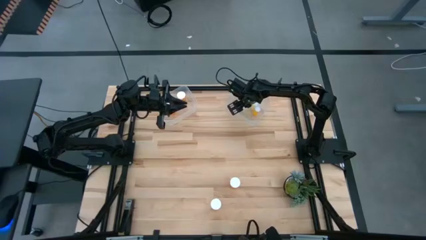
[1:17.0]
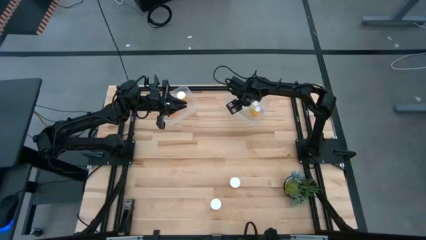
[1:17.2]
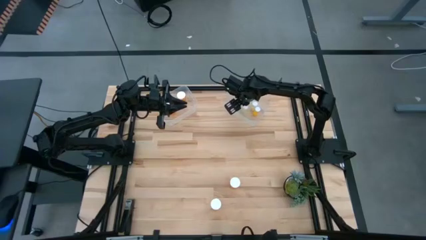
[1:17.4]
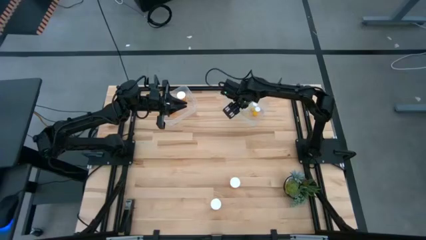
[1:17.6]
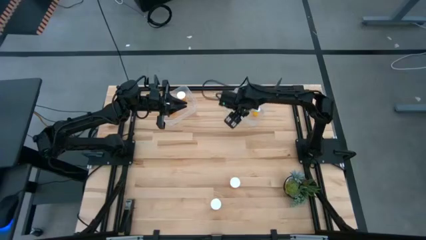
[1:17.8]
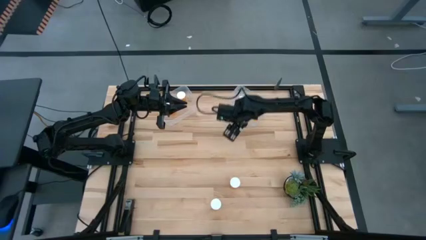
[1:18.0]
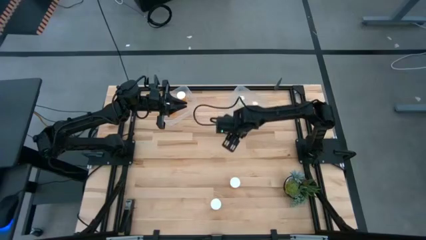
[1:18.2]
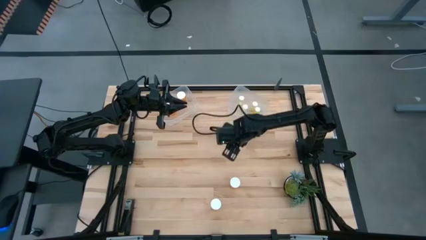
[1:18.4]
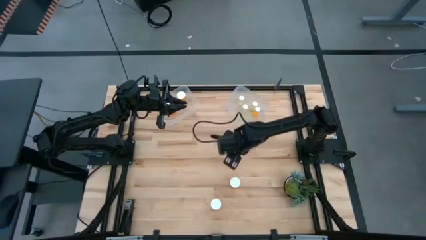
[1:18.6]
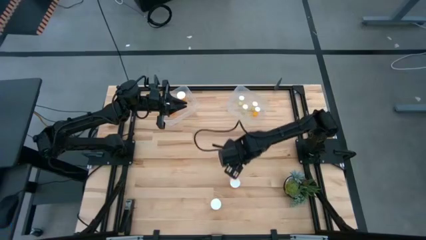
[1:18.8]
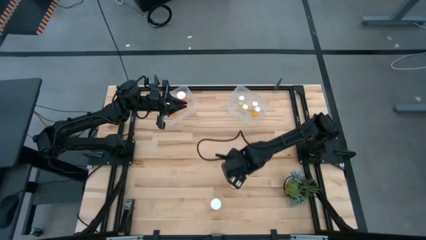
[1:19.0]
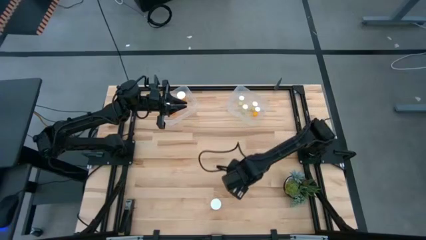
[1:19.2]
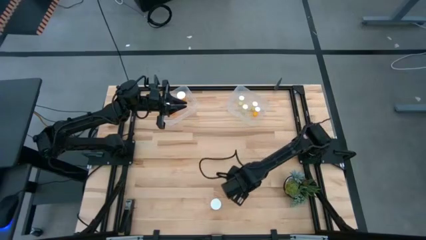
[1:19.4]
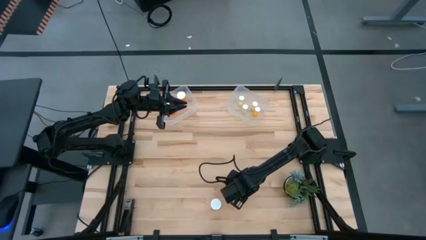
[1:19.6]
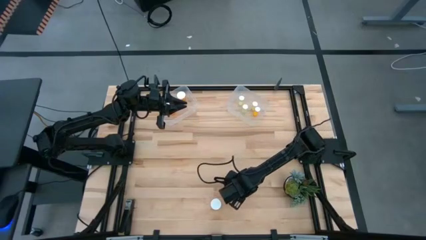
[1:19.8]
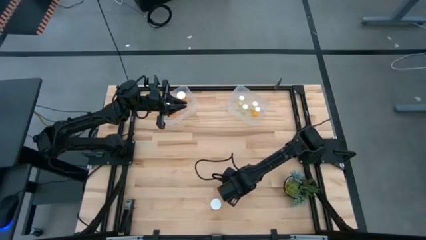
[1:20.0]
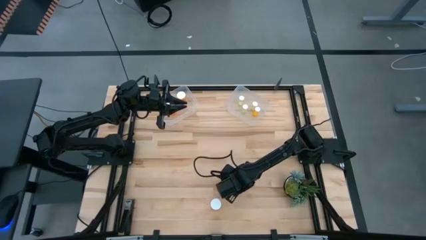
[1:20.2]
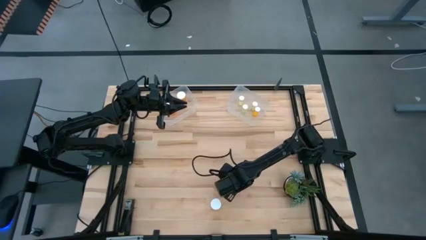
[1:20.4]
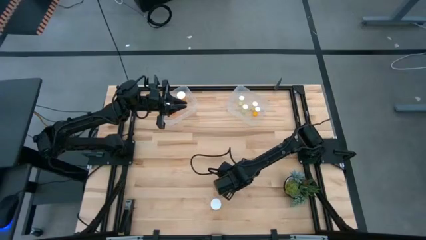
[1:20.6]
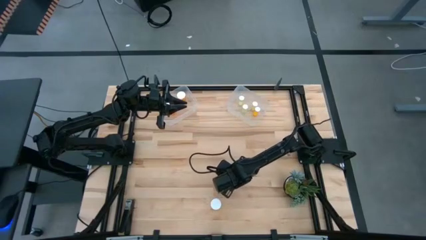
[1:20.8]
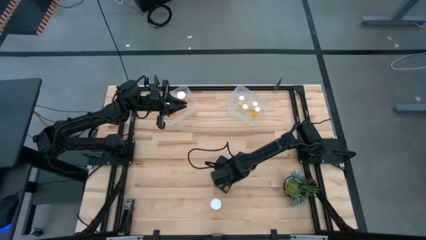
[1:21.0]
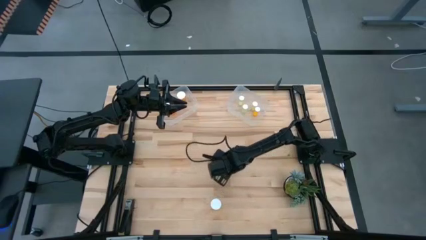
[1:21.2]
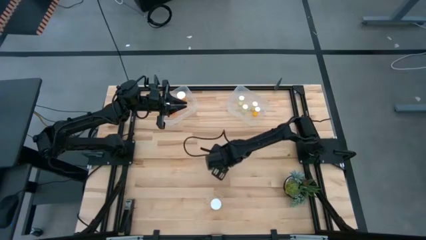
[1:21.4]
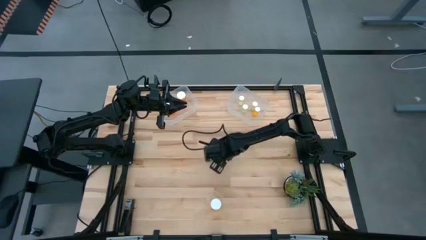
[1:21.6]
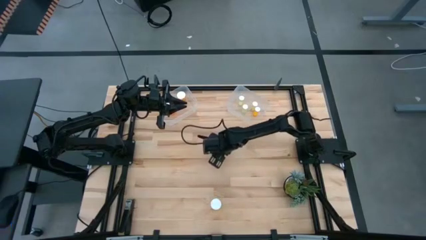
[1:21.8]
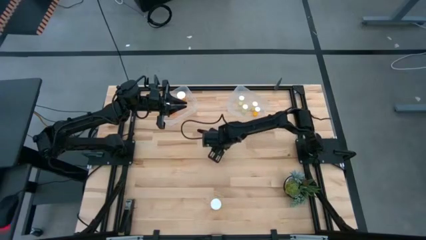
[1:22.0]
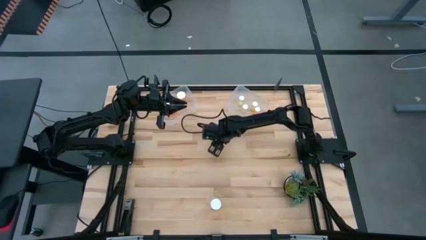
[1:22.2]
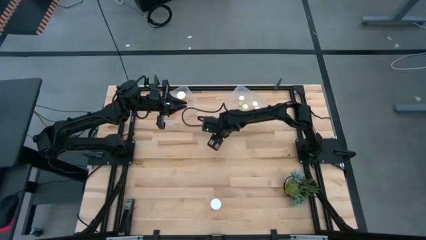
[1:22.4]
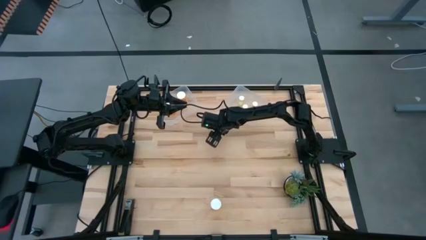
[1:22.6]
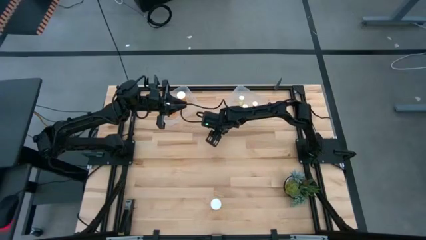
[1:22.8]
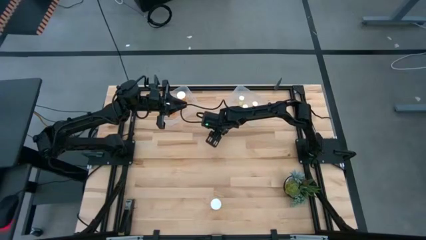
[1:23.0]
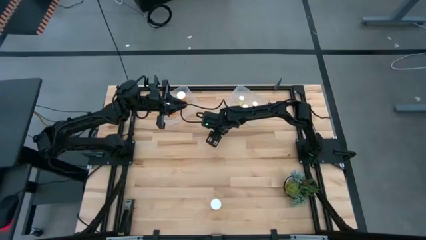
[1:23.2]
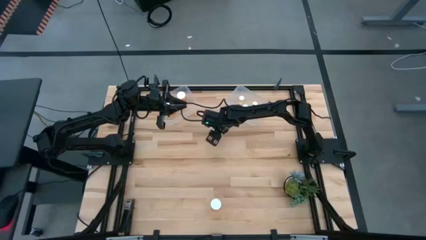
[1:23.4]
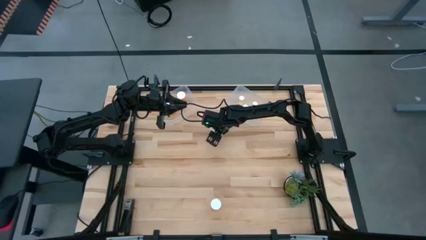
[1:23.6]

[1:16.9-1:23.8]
Task: Pick and place medicine bottles into bin by pill shape (circle, oval)
Move the large orange medicine bottle to the center of the table

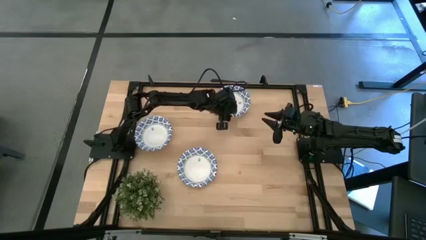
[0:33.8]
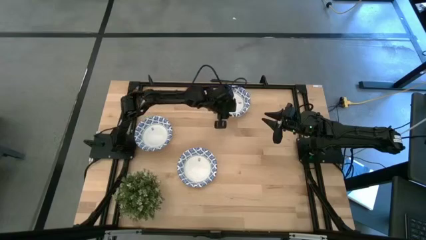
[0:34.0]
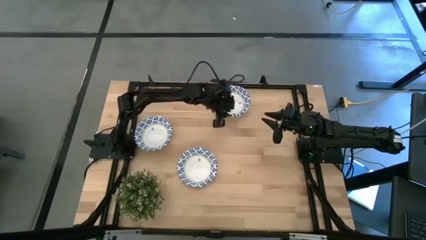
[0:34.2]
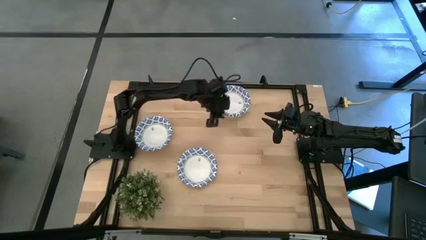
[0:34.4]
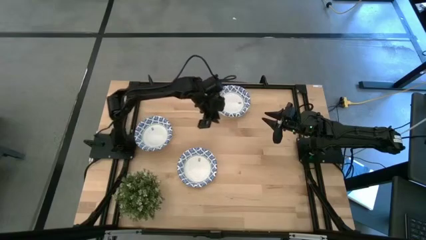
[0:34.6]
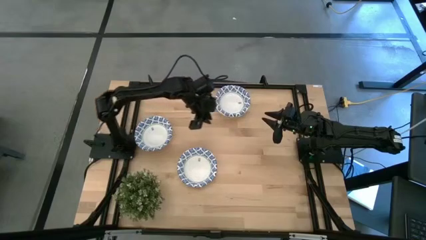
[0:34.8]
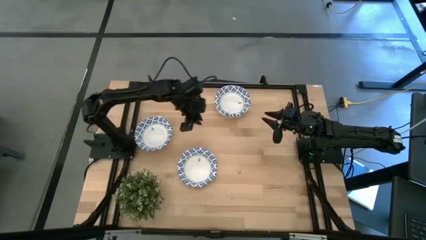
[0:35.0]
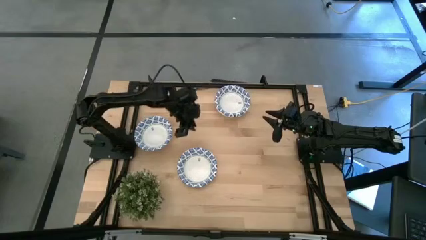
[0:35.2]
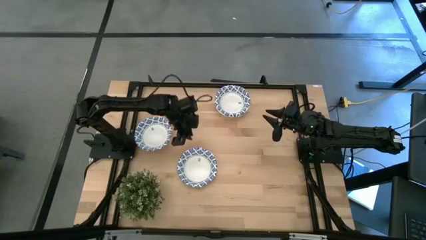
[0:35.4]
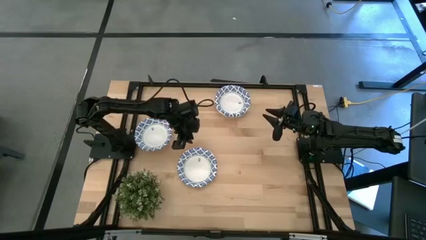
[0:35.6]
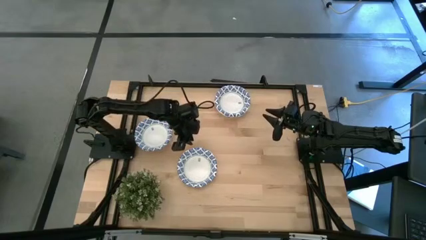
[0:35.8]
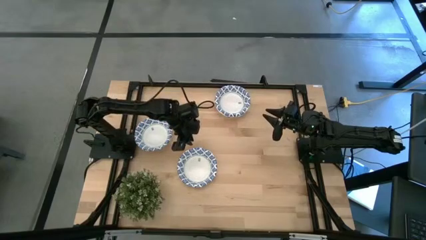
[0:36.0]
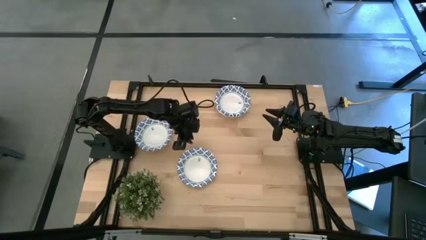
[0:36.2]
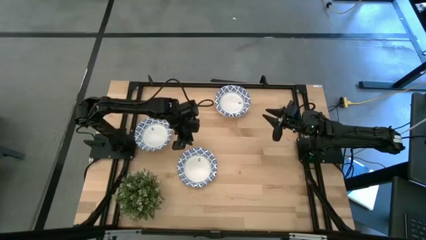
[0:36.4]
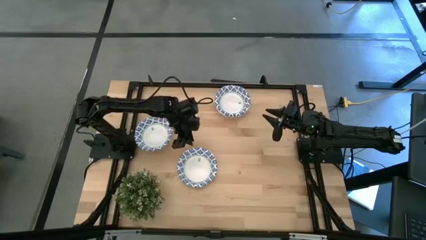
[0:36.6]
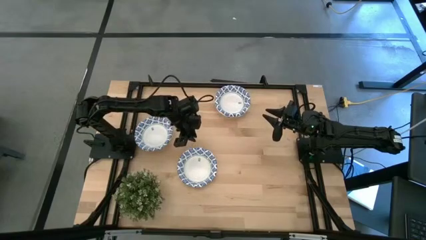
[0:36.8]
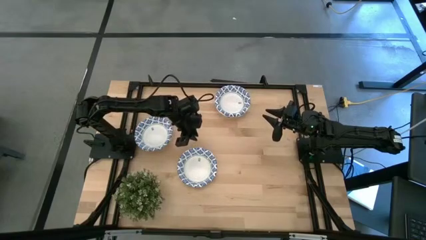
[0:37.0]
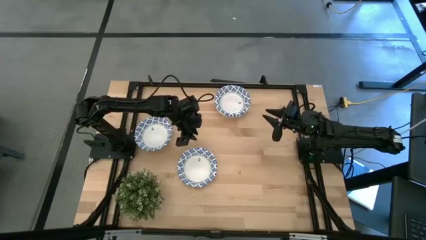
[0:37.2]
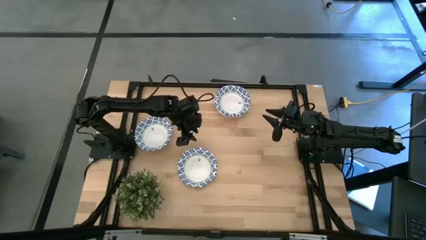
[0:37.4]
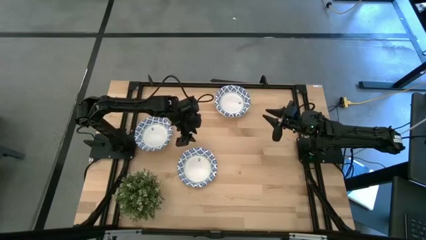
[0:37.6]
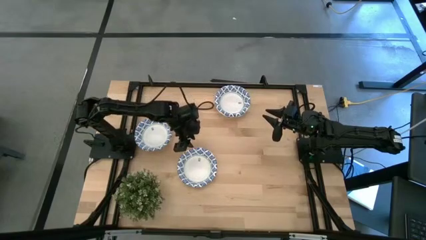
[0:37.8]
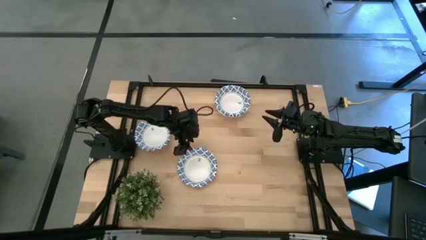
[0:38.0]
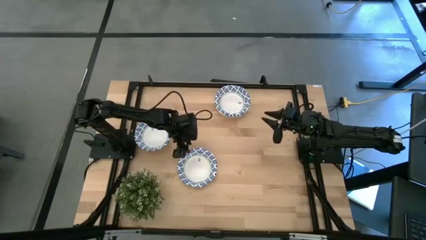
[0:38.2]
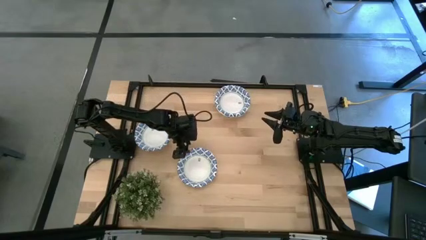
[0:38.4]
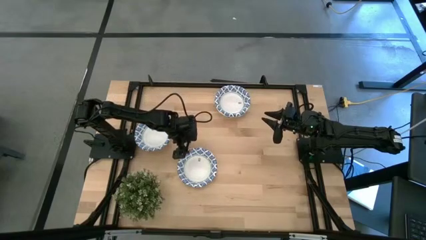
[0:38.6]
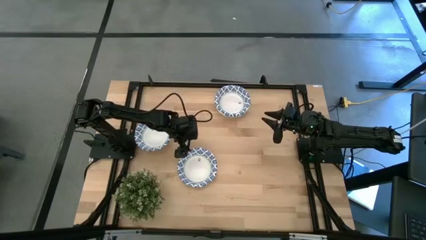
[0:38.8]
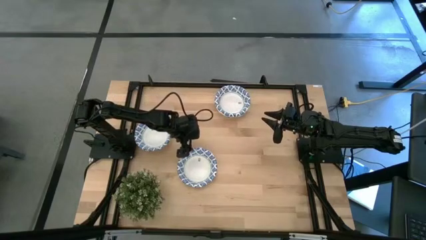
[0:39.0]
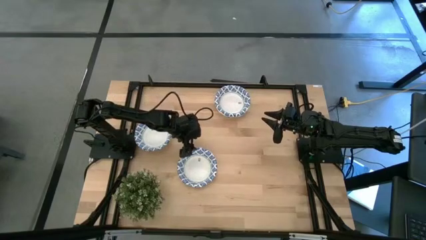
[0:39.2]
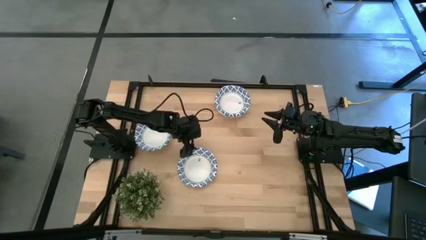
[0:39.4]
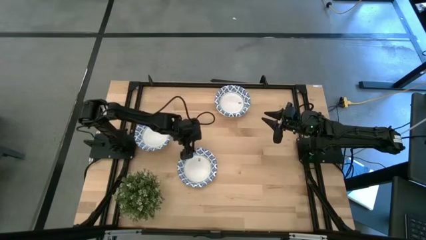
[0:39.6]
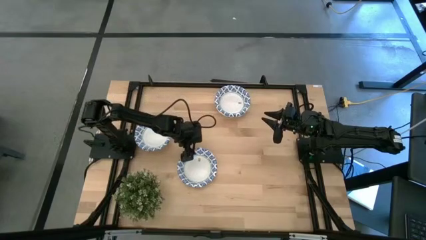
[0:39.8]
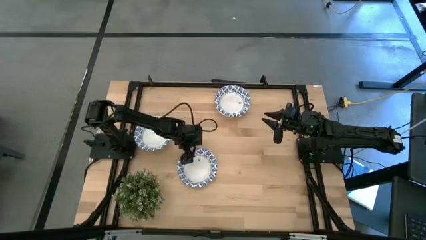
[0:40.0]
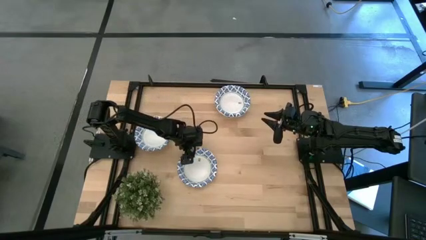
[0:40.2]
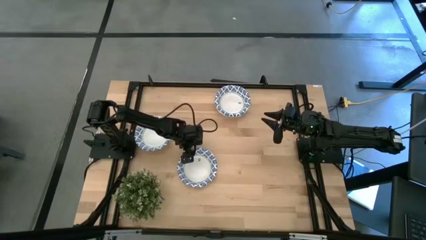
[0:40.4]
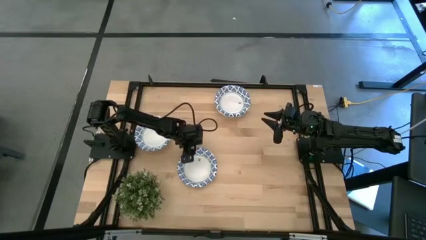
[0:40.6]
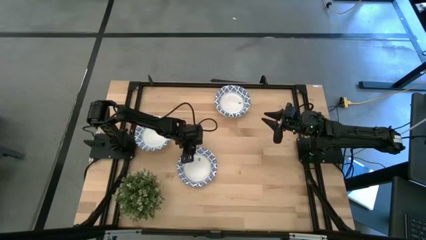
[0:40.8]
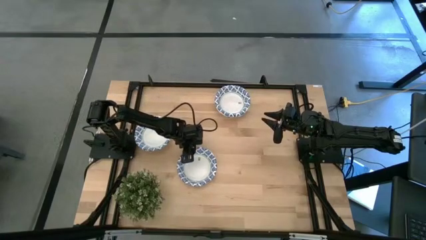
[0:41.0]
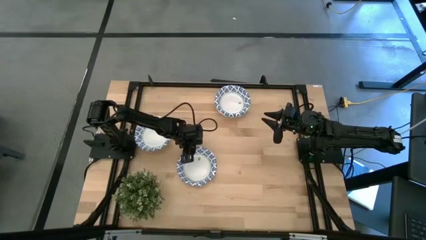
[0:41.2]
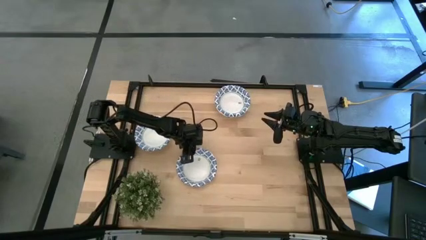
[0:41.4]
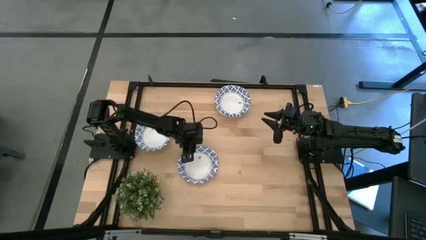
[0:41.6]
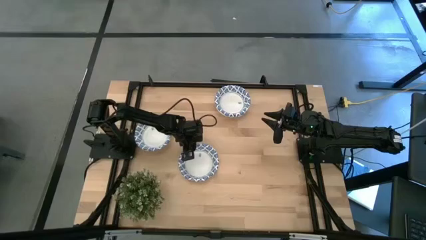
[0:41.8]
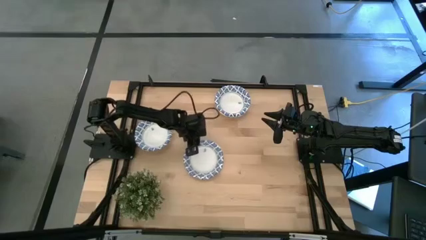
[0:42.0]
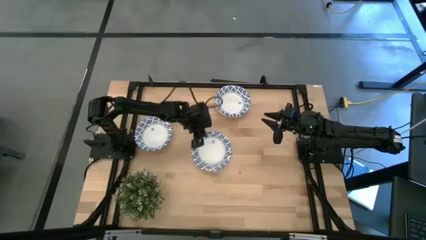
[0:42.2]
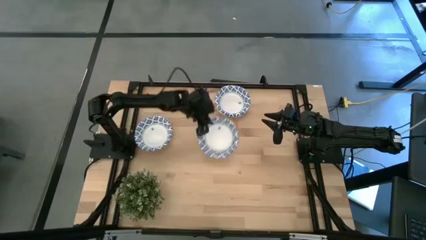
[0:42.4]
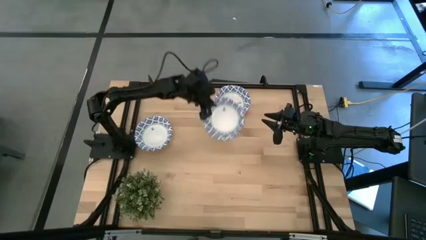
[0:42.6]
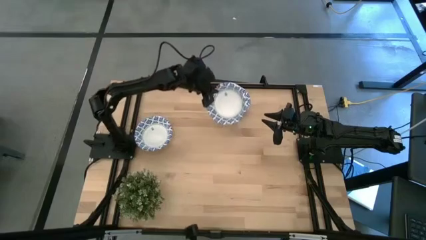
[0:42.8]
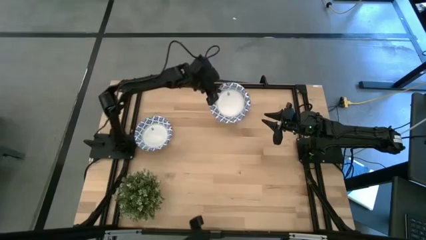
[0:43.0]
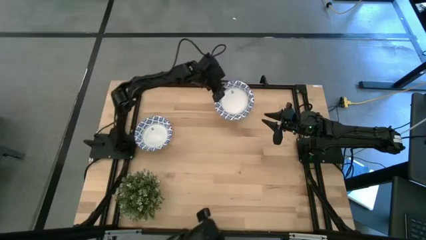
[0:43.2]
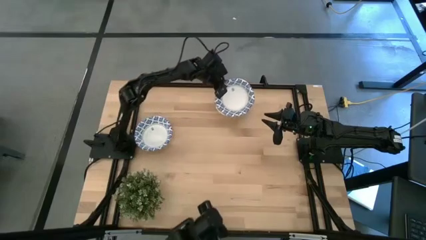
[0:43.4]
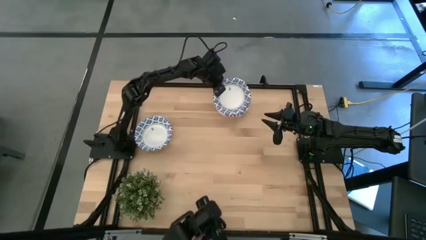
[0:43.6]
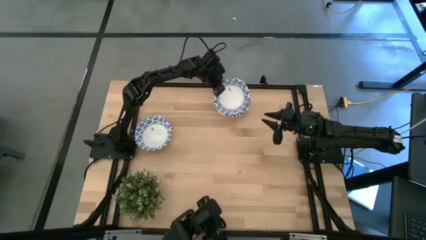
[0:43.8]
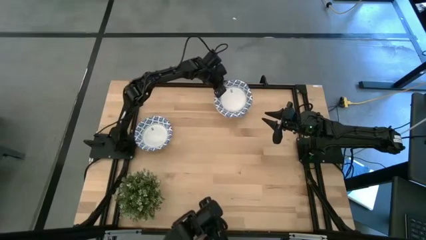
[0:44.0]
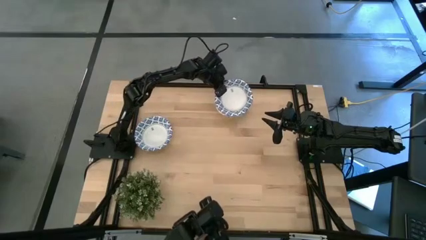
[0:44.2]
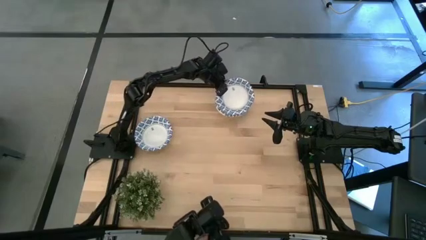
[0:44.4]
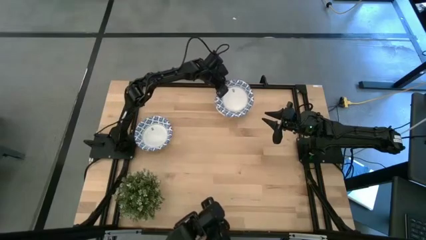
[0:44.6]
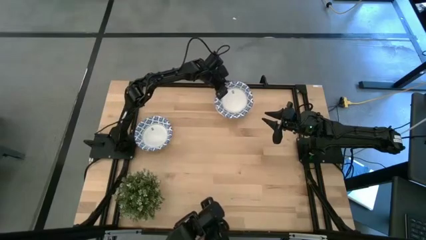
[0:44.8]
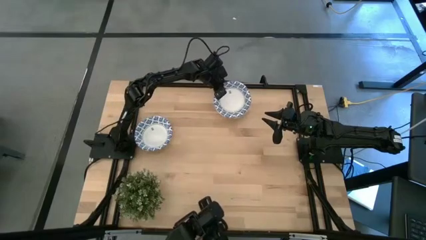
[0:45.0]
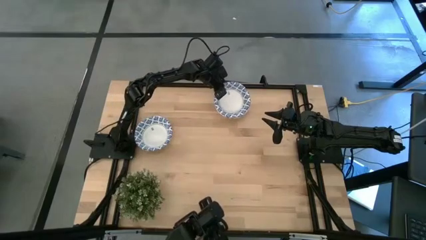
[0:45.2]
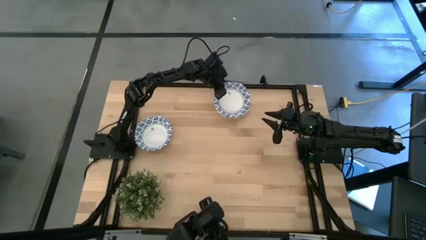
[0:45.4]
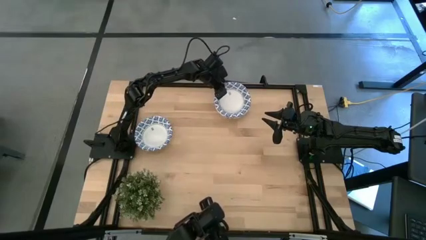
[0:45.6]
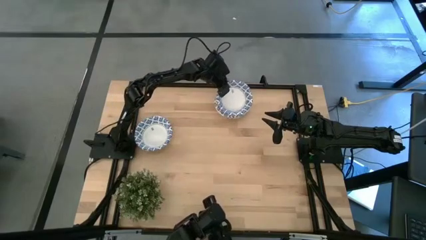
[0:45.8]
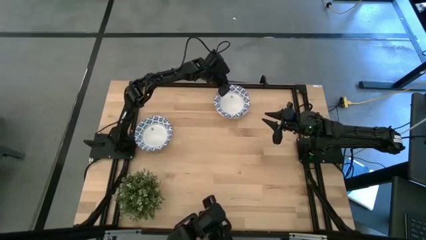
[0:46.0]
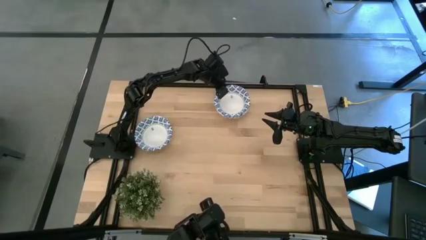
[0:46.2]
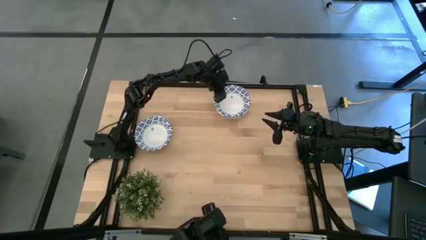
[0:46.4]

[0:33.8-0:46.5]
Task: Nest bowls inside each other
Stack the middle bowl on the right bowls
